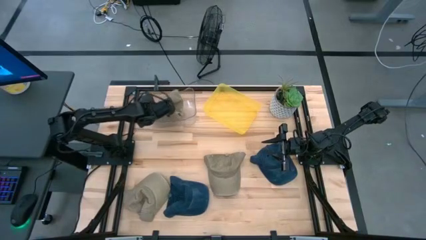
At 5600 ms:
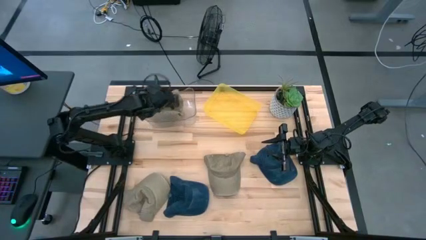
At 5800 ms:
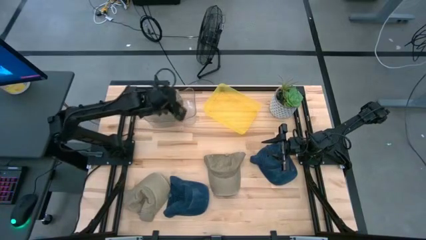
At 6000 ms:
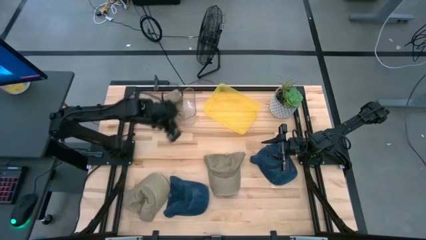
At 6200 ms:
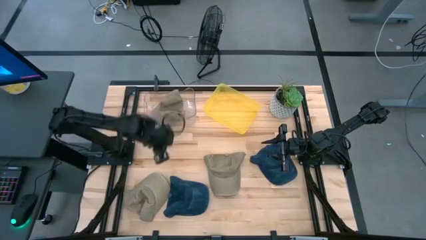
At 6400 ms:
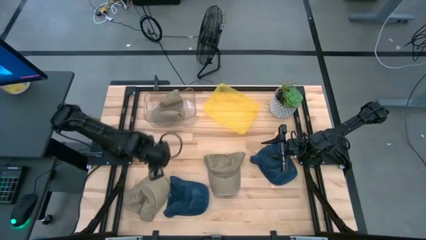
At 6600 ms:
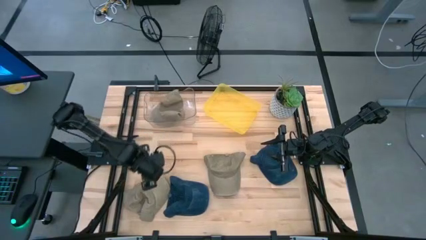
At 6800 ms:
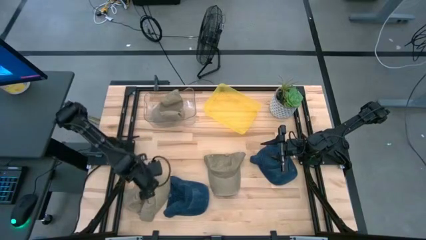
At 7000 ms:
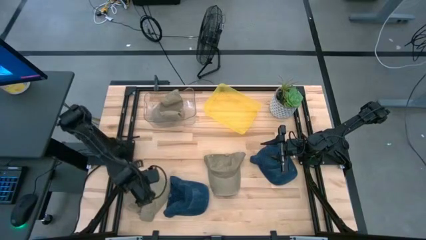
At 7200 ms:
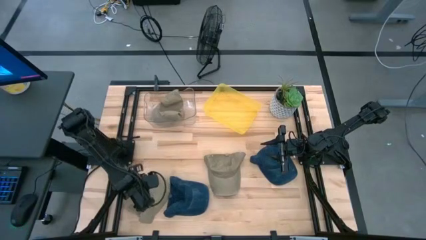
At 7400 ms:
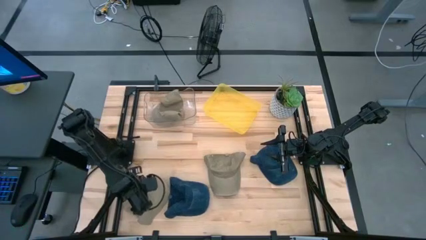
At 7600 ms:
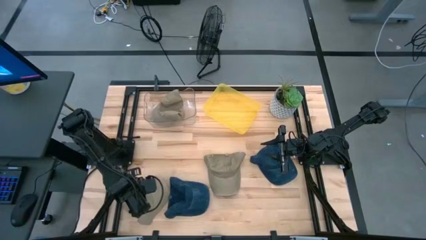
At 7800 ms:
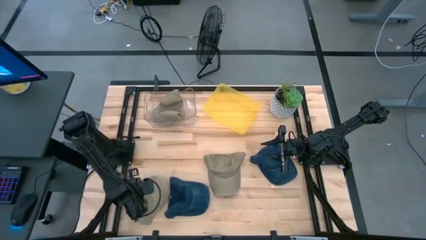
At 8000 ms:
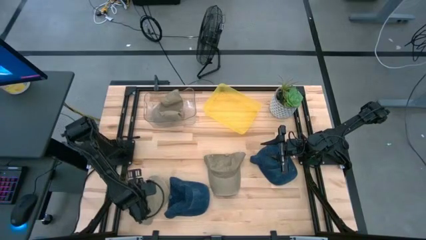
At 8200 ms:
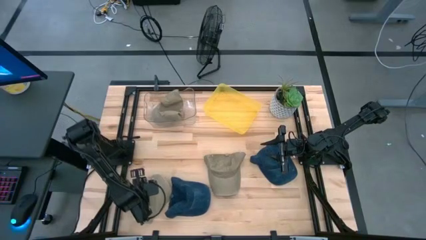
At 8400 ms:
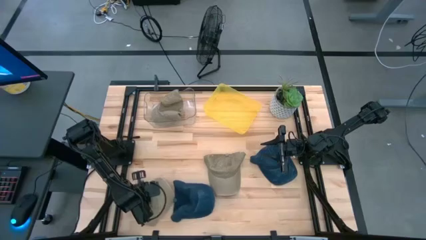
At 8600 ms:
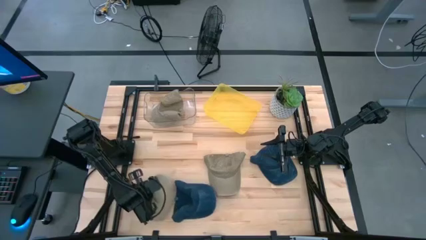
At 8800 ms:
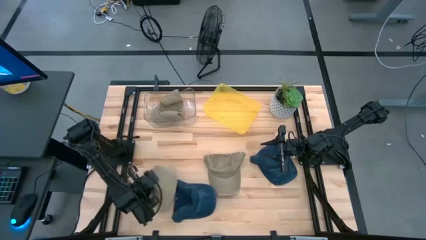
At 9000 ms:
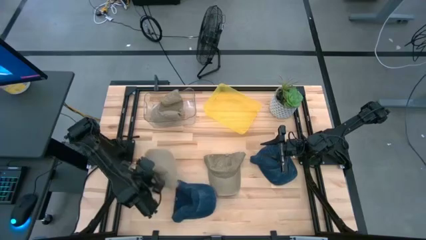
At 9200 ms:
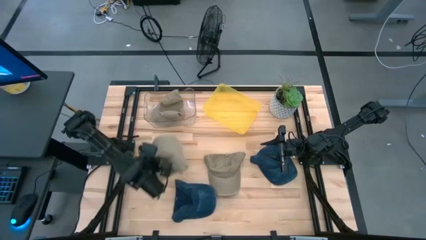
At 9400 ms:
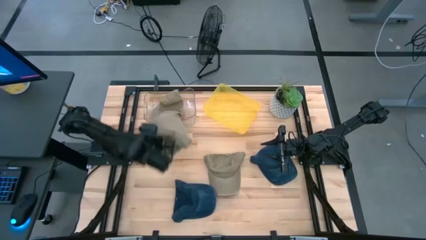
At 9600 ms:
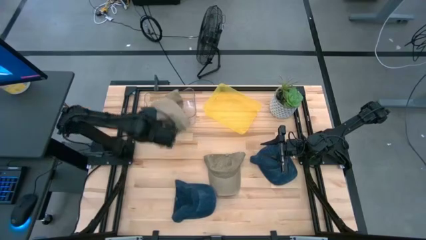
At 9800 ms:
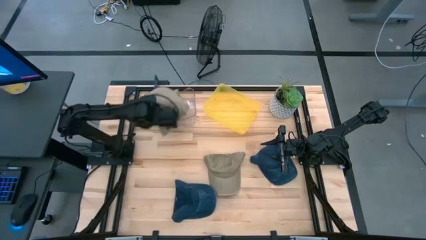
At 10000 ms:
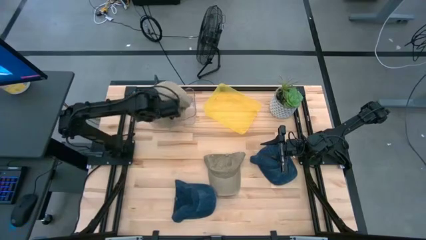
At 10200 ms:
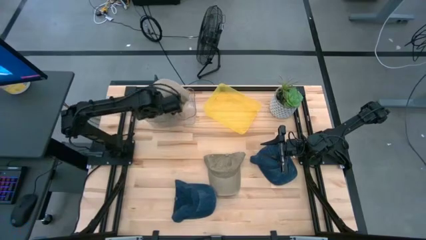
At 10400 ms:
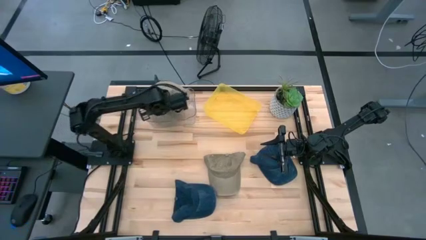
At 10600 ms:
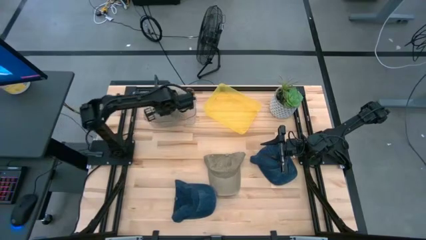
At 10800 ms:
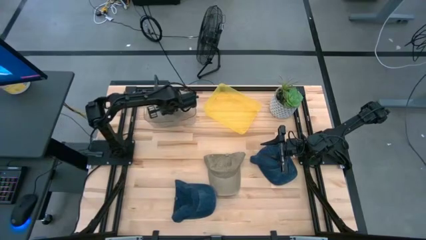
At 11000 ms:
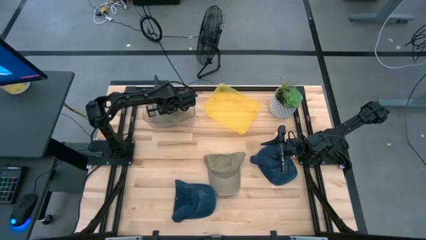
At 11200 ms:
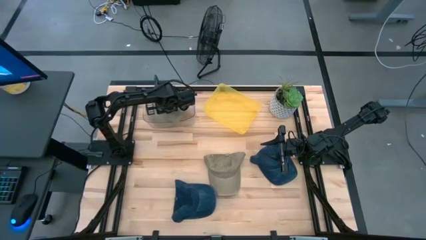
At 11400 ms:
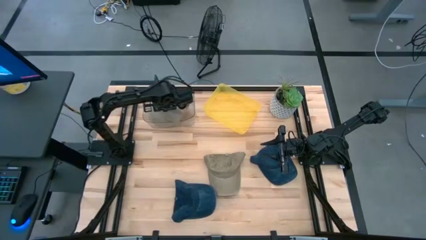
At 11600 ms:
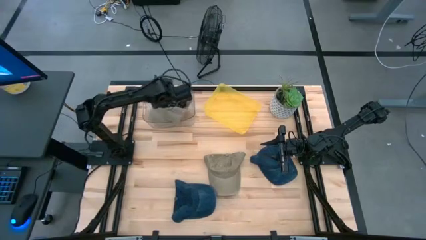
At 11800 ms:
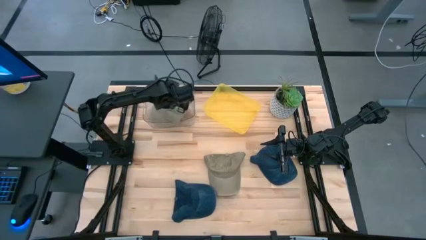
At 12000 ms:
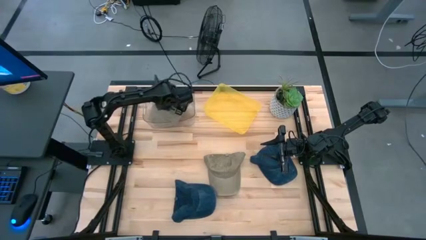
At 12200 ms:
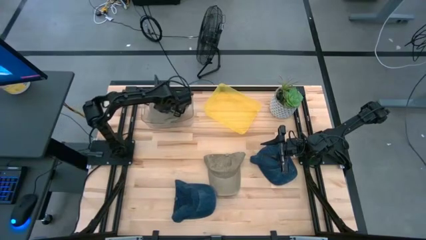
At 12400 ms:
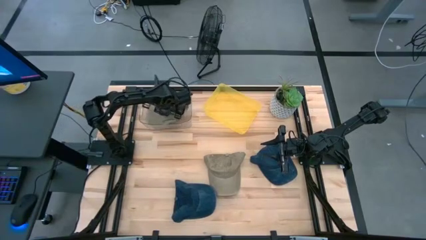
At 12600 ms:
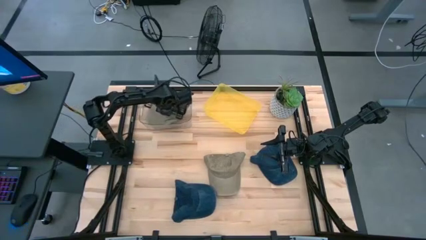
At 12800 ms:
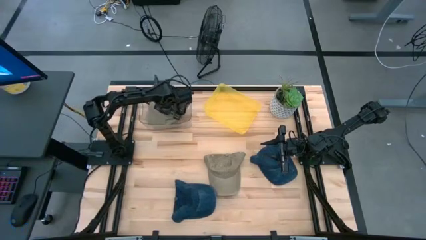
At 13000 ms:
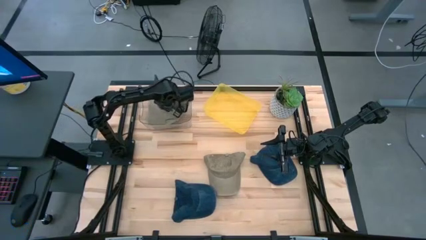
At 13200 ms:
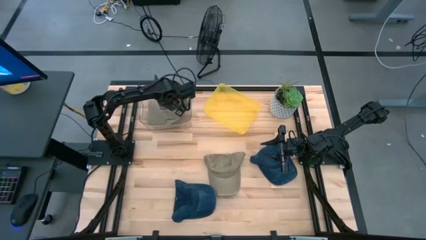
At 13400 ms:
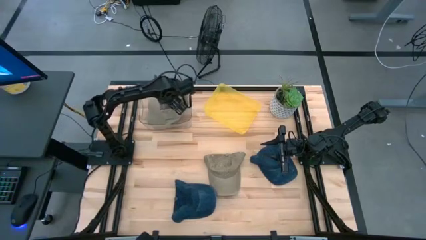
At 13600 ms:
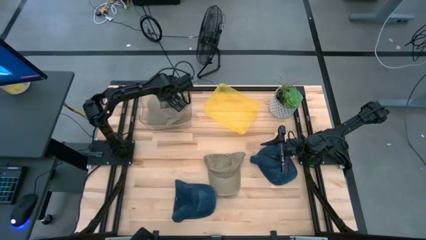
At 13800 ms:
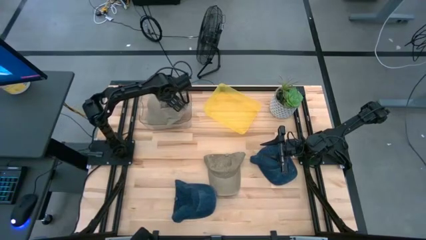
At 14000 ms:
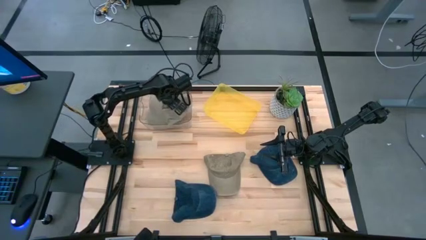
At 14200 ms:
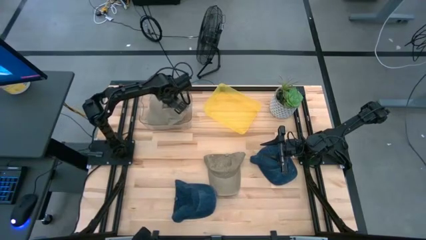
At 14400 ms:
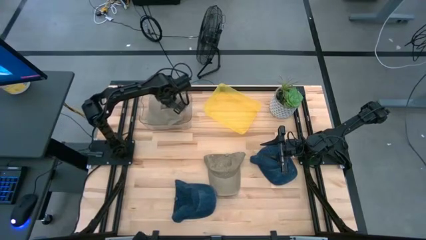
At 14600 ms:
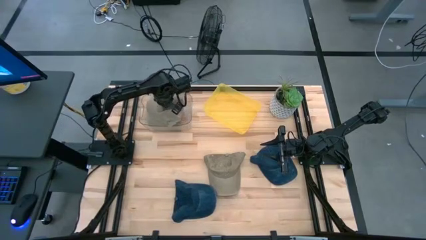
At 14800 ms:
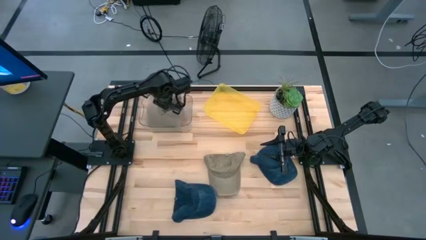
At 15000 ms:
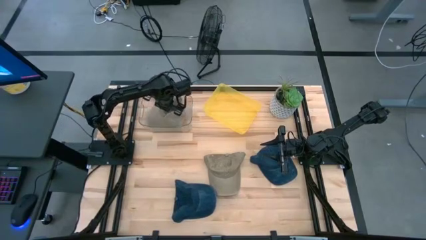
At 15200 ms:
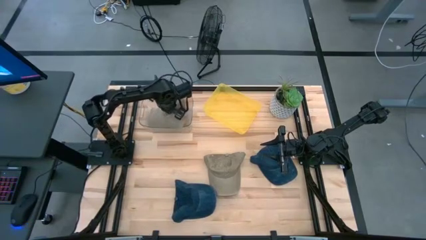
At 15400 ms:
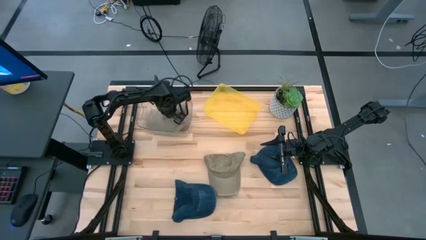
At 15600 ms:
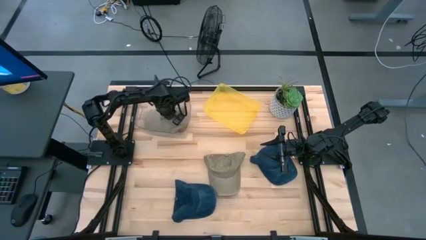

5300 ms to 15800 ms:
Task: Pick & Place hat
Put the left brown cap into the transparent bin
